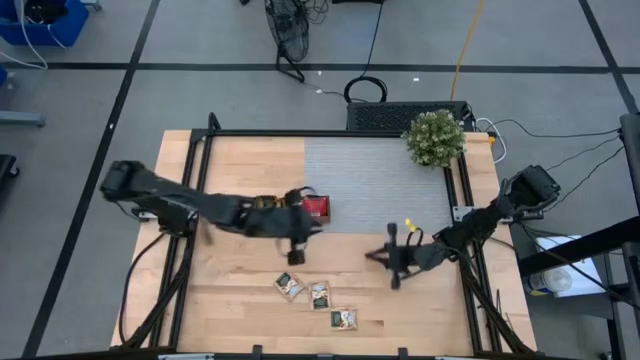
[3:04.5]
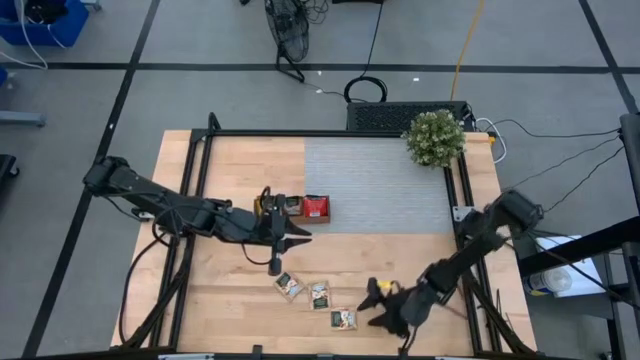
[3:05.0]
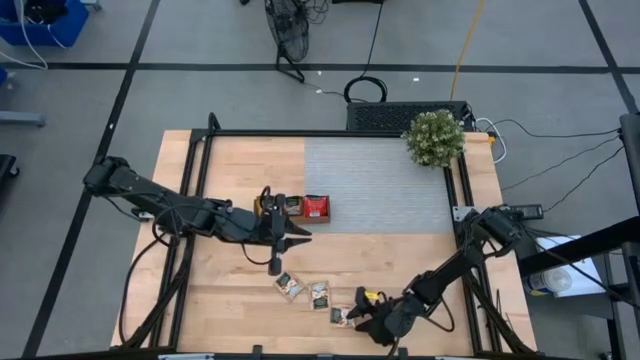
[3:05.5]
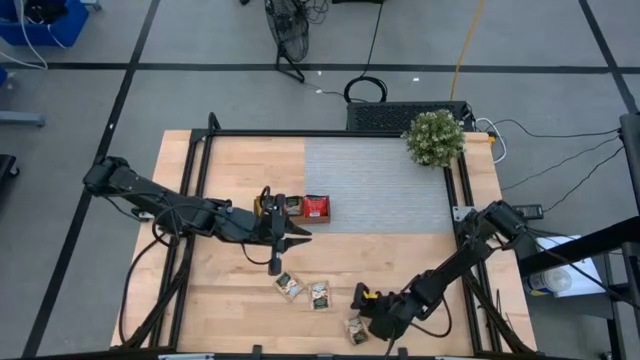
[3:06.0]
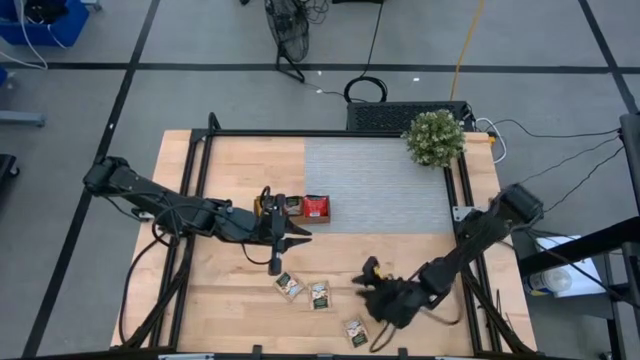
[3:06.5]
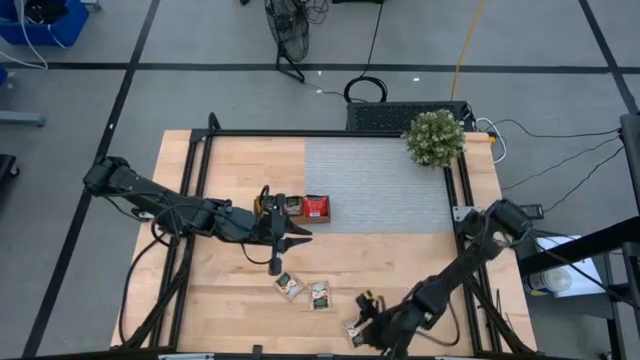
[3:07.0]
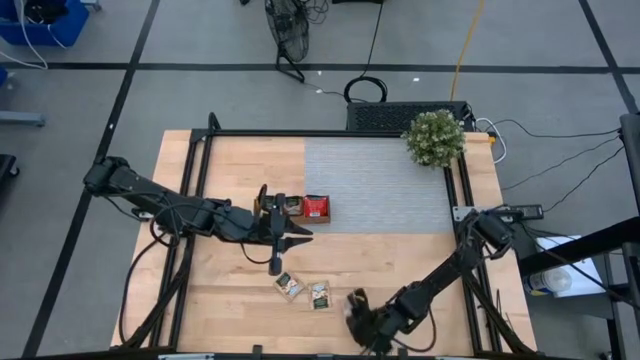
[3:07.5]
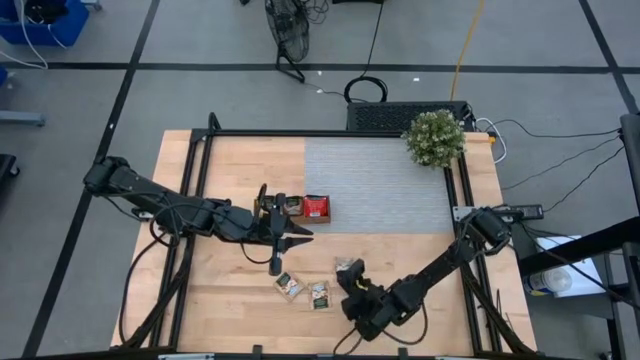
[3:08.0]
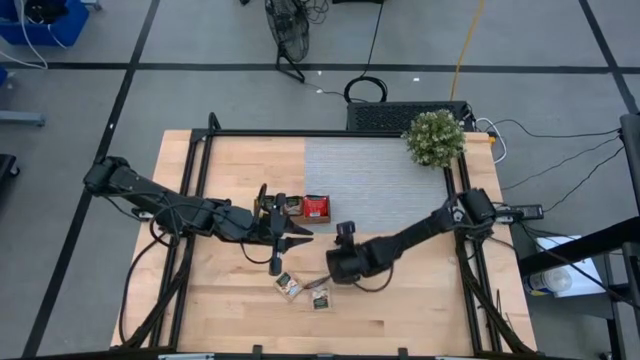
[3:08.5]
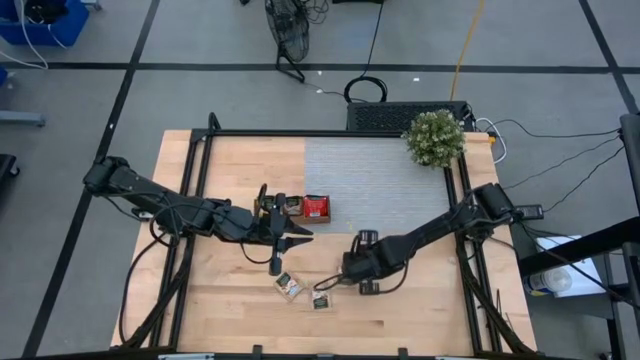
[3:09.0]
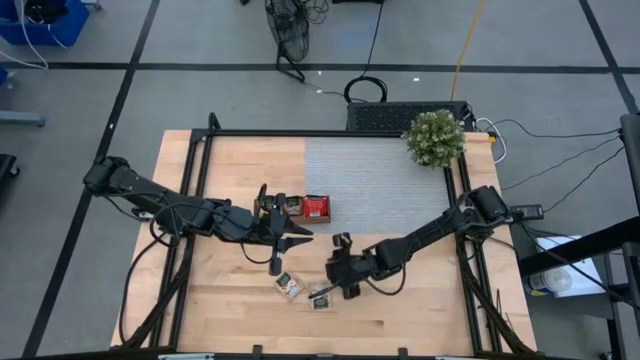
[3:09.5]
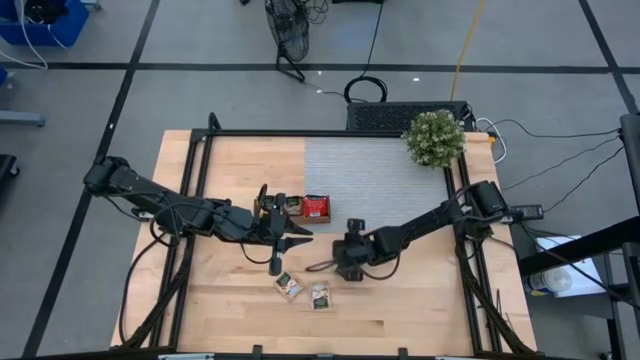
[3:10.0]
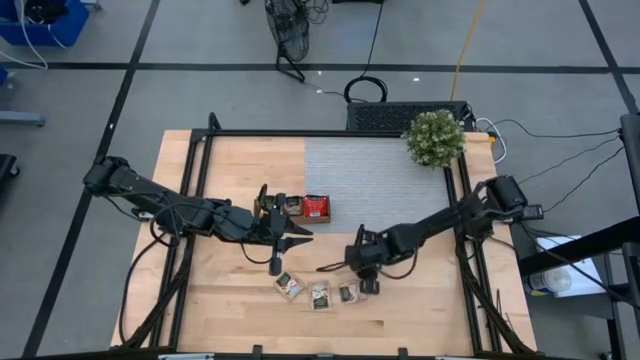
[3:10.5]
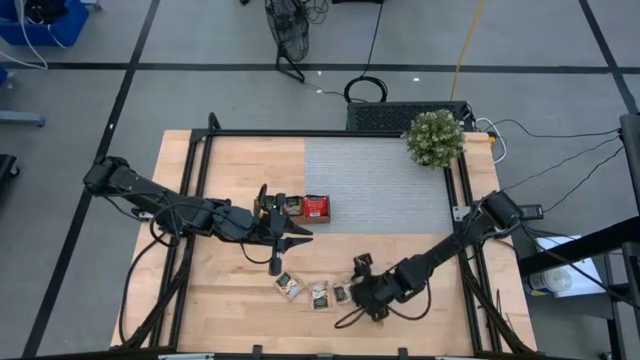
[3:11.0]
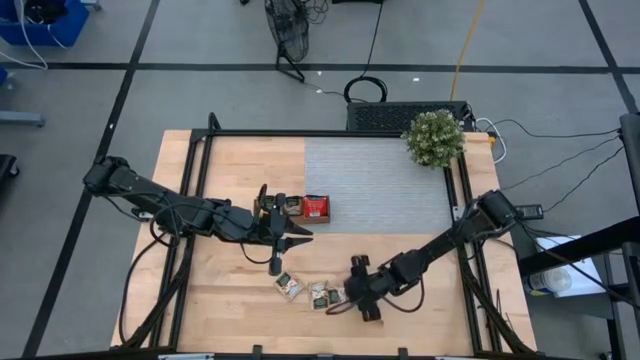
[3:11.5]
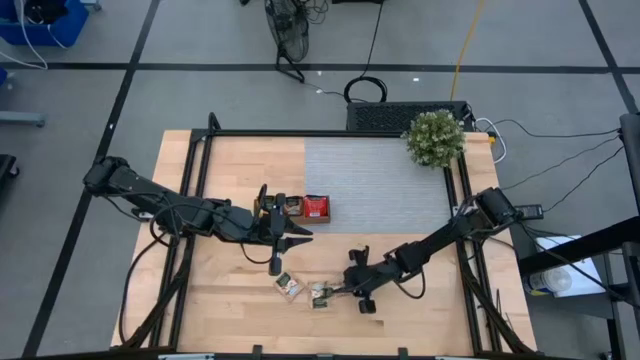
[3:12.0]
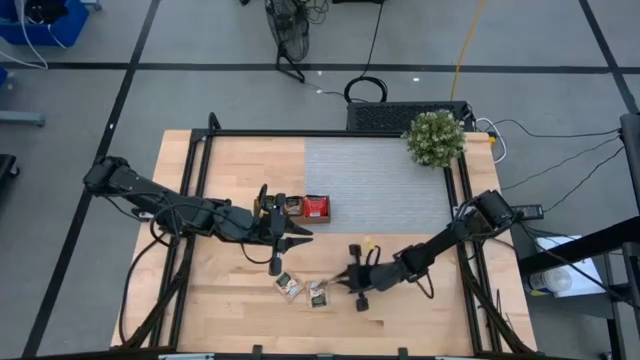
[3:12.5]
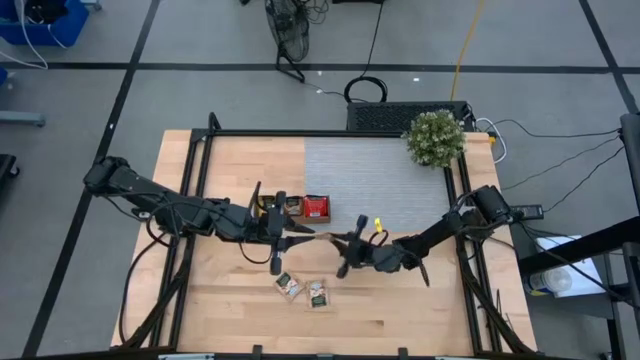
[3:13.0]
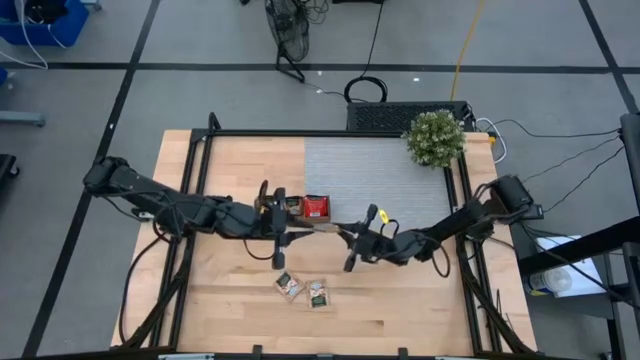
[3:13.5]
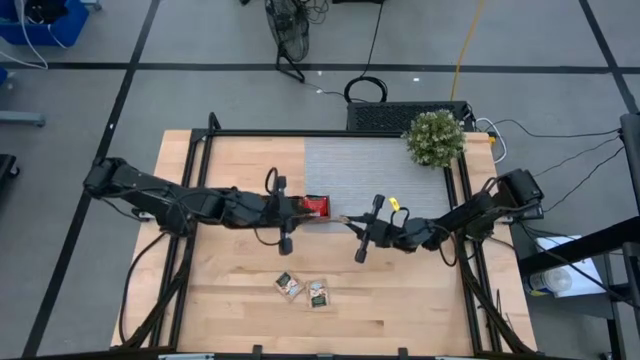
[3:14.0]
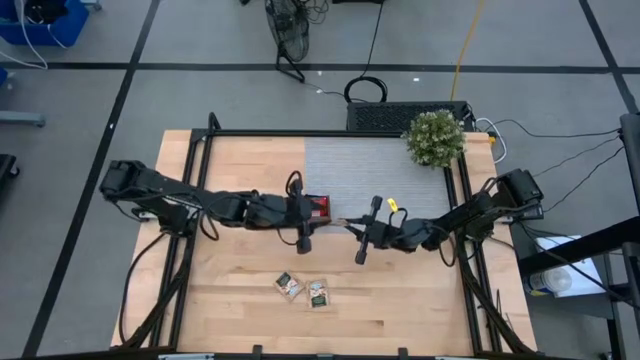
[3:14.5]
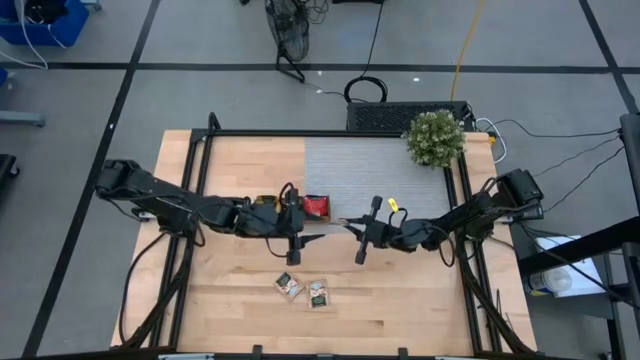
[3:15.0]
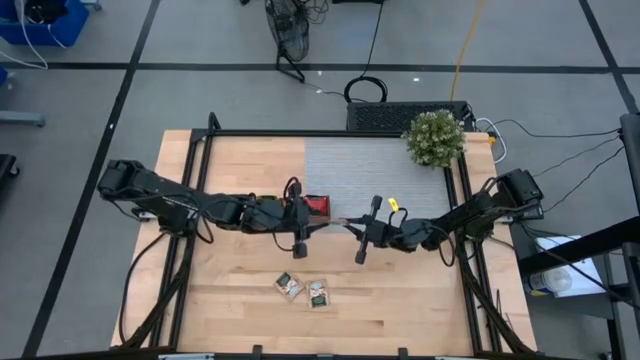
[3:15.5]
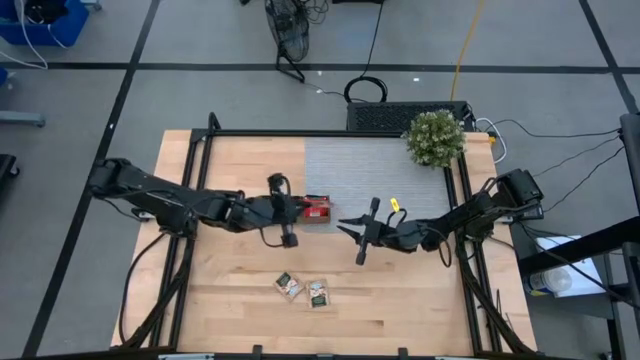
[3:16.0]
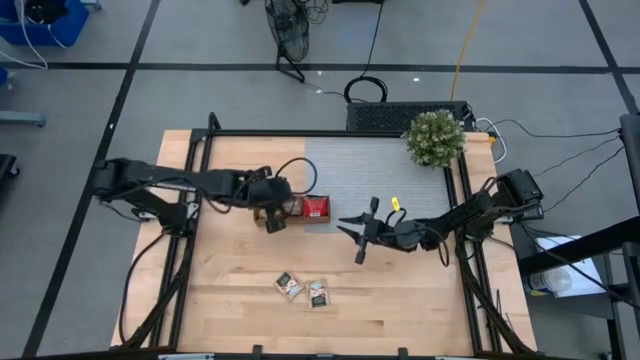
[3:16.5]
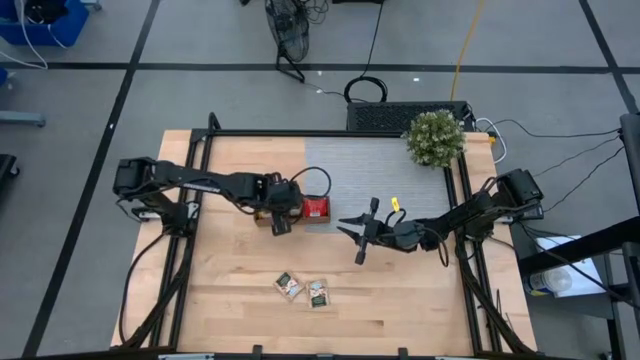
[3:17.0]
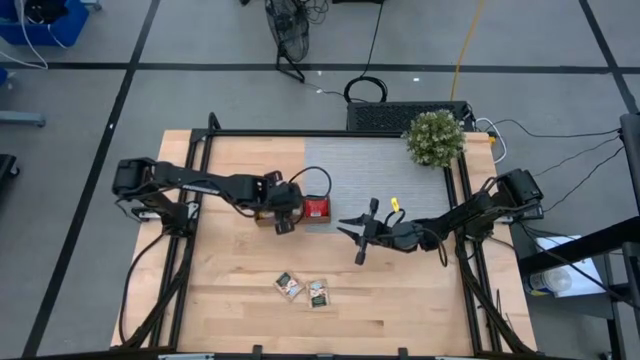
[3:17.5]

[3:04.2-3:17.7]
Task: Pick & Place Tea
Put the brown tea bag into the middle section of the wooden organizer

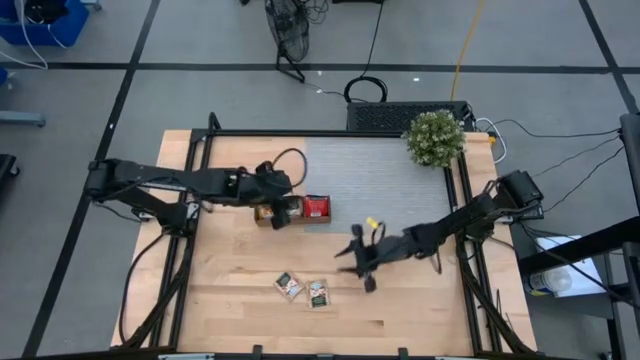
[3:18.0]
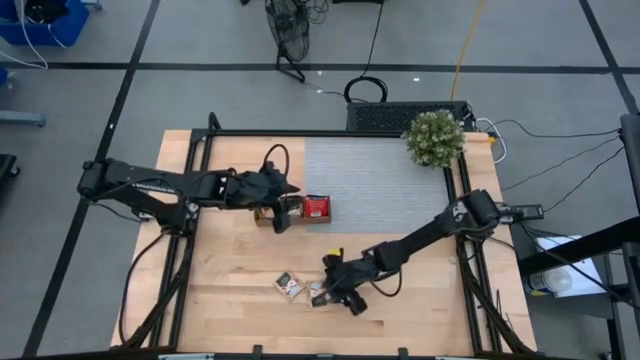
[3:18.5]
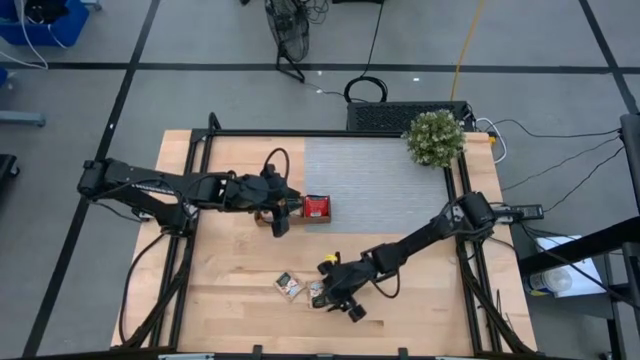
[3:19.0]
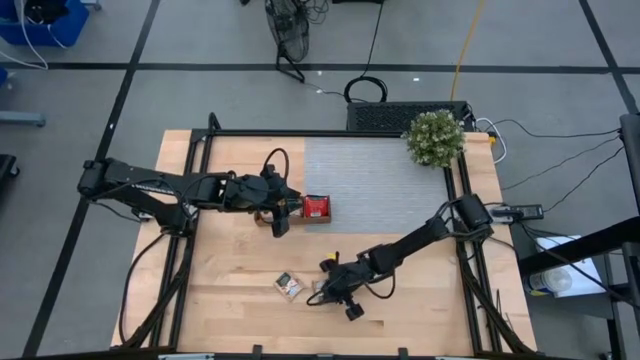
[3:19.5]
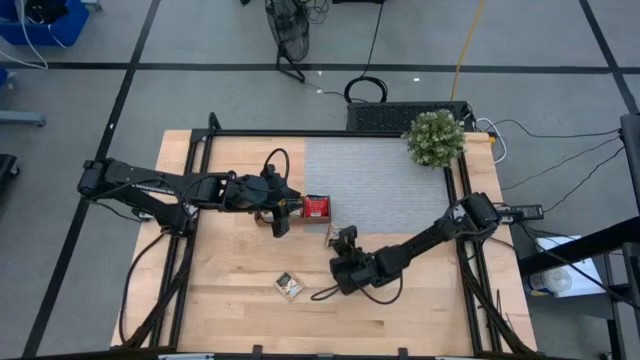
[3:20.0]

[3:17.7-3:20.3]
Put the brown tea bag into the middle section of the wooden organizer

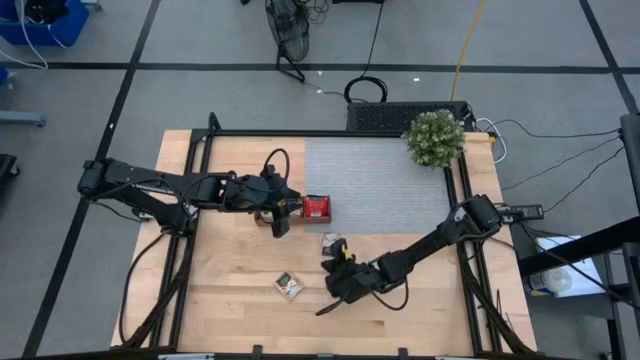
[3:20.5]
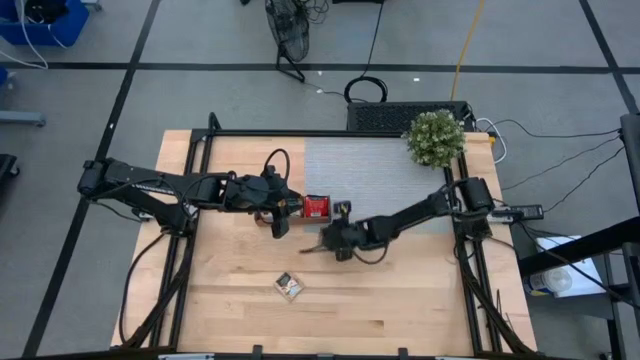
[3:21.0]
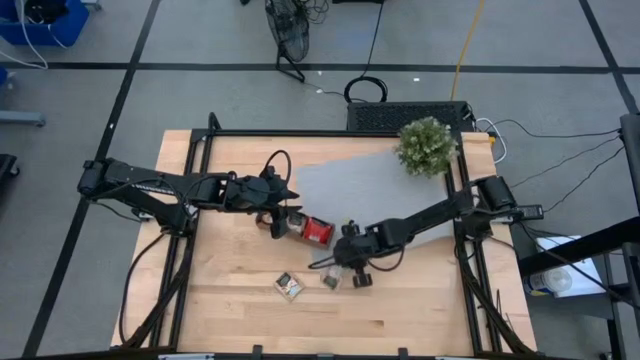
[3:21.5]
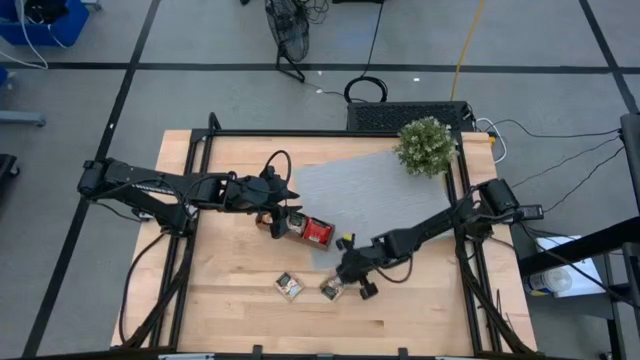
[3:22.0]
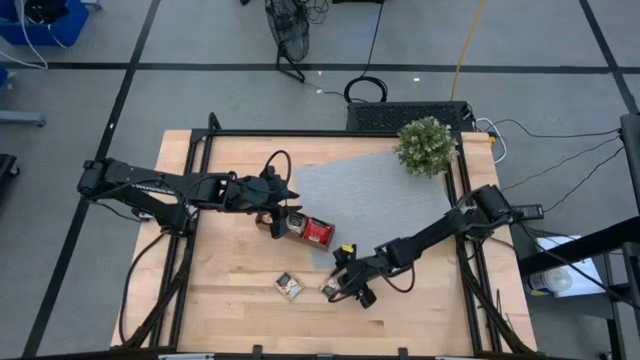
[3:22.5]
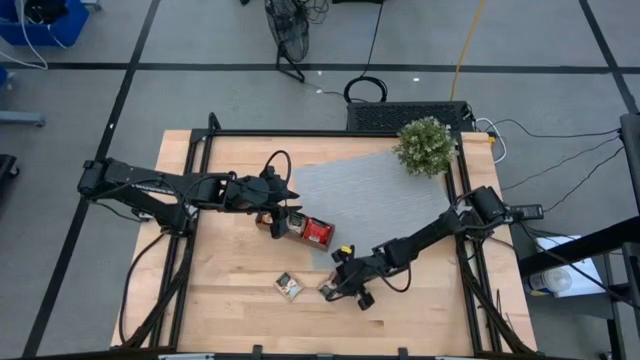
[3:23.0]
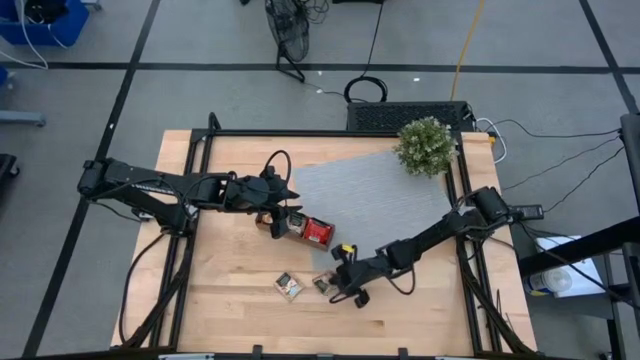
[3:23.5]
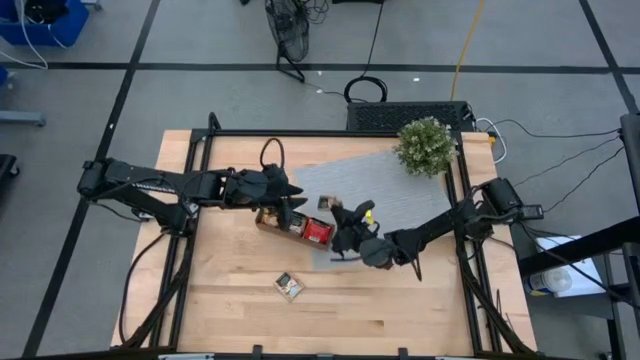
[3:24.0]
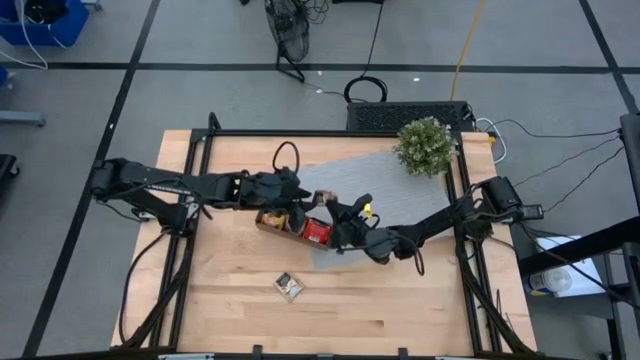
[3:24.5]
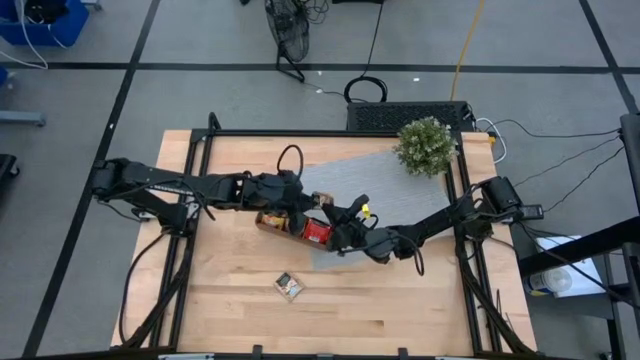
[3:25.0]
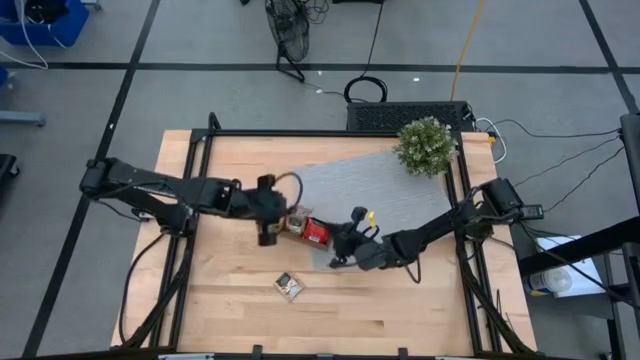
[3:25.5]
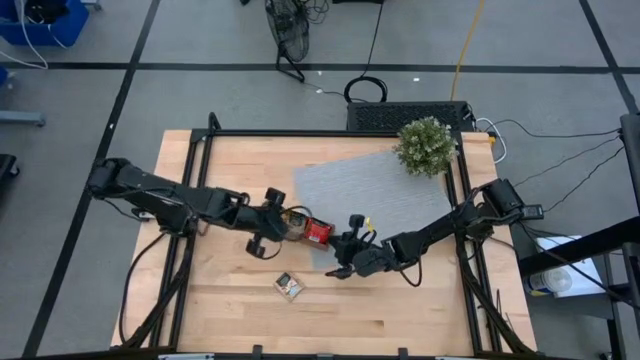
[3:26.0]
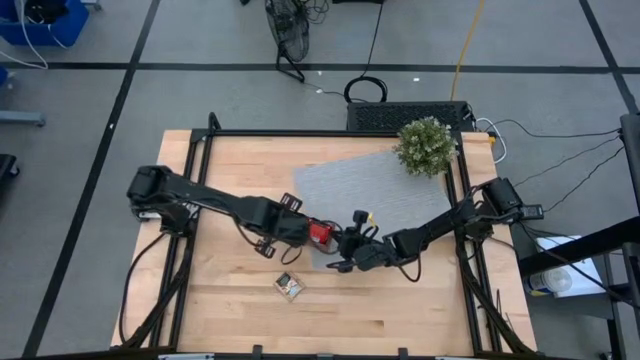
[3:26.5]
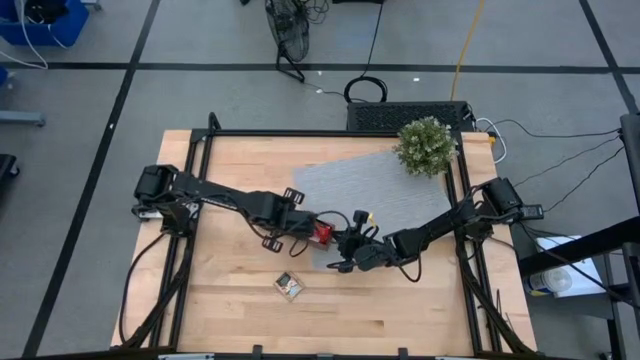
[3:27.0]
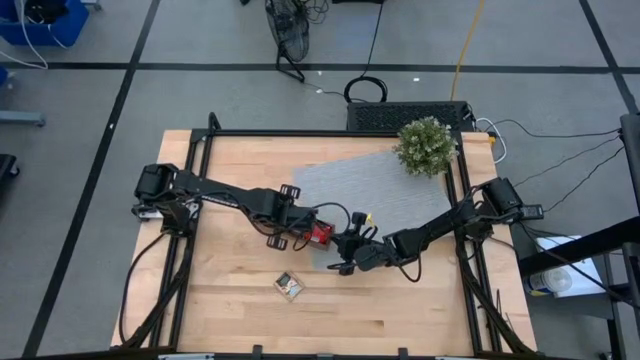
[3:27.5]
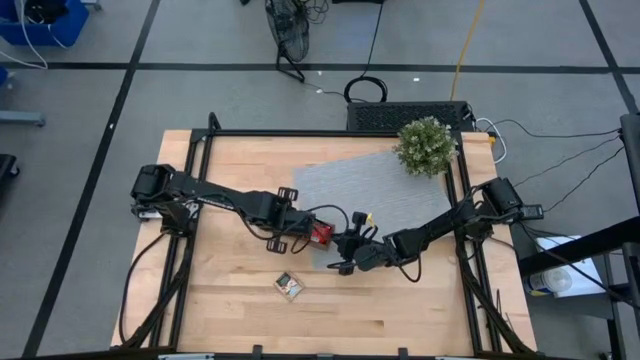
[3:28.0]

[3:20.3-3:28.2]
Put the brown tea bag into the middle section of the wooden organizer
